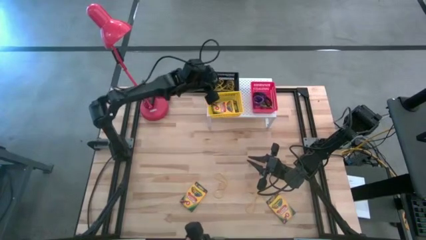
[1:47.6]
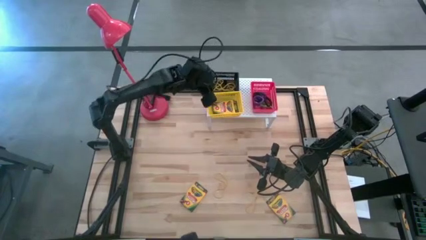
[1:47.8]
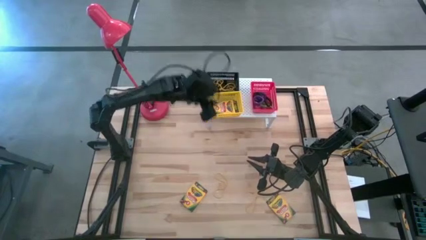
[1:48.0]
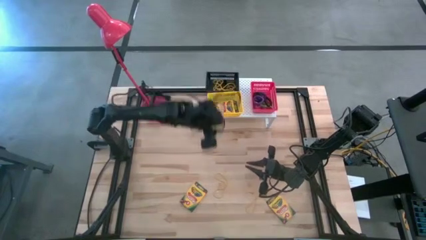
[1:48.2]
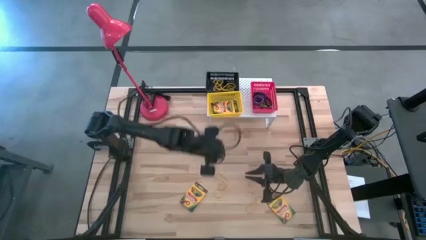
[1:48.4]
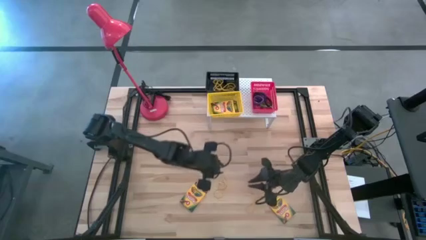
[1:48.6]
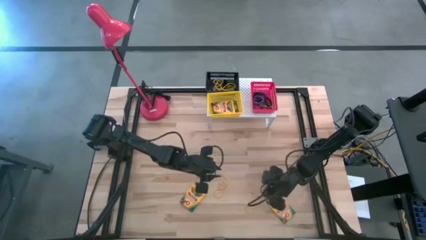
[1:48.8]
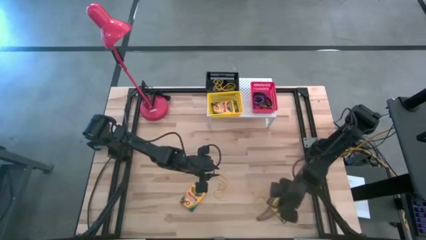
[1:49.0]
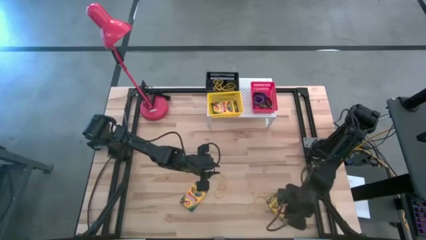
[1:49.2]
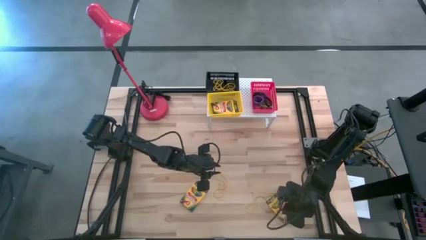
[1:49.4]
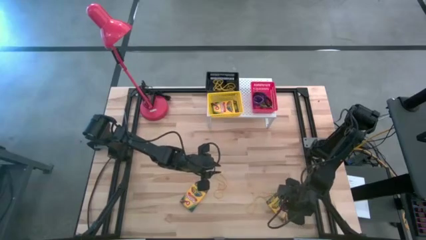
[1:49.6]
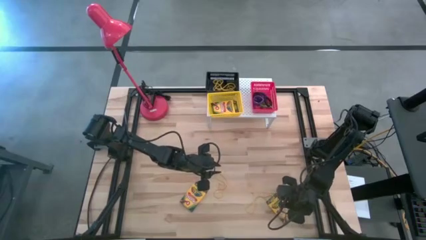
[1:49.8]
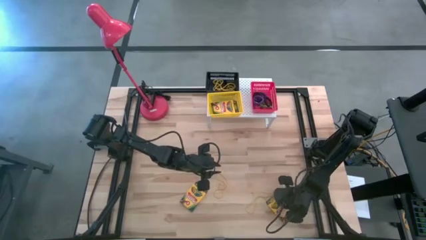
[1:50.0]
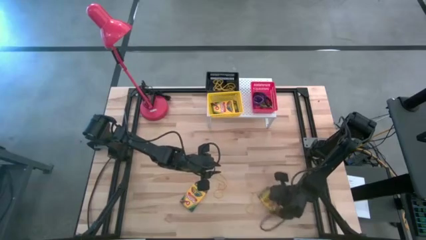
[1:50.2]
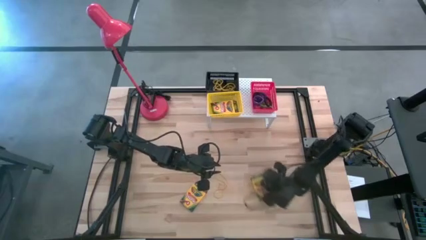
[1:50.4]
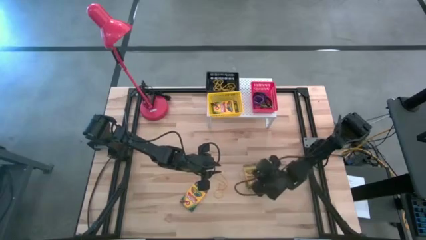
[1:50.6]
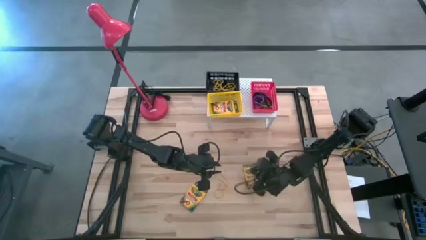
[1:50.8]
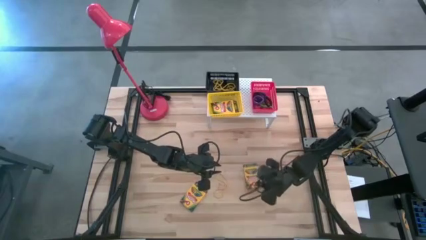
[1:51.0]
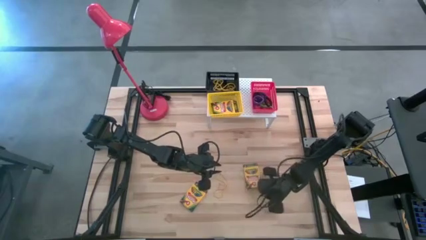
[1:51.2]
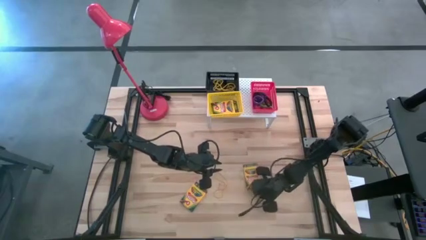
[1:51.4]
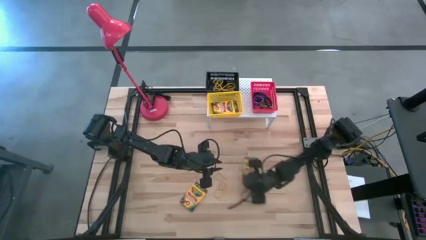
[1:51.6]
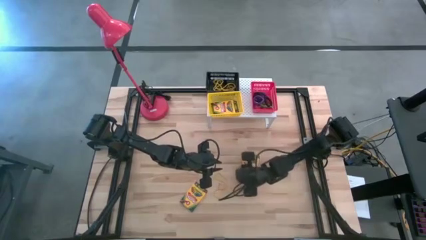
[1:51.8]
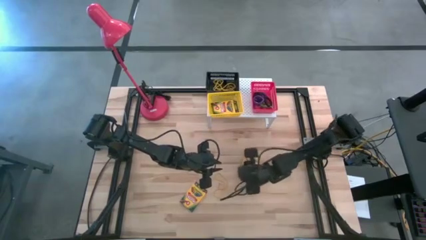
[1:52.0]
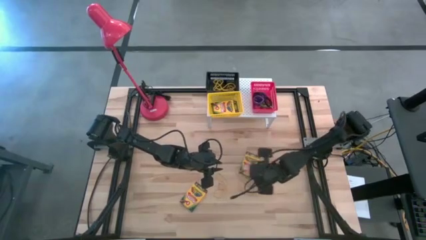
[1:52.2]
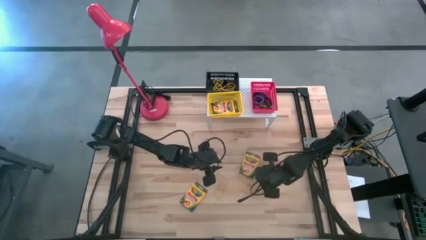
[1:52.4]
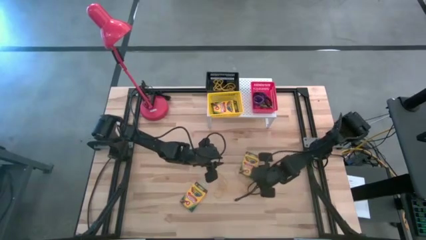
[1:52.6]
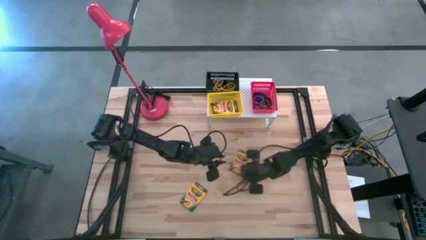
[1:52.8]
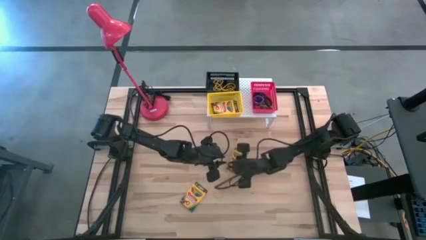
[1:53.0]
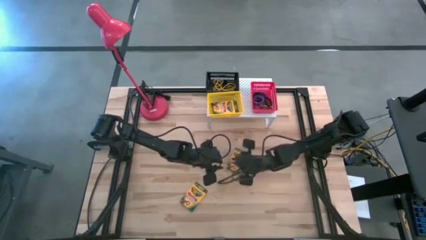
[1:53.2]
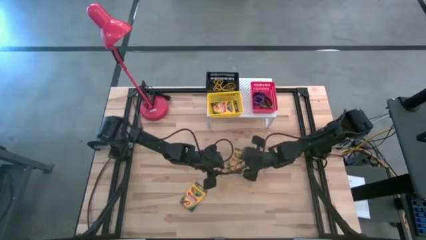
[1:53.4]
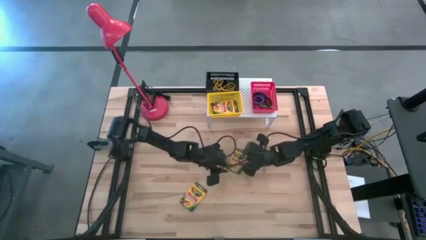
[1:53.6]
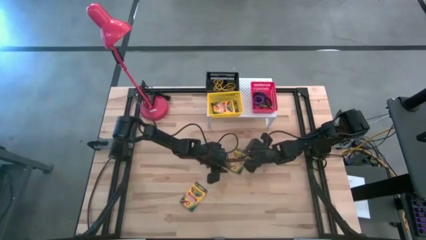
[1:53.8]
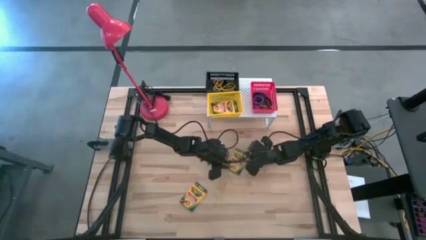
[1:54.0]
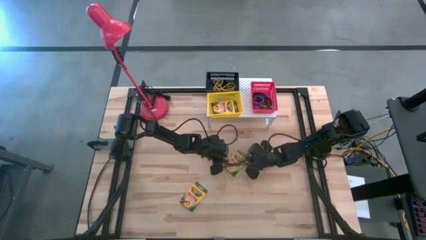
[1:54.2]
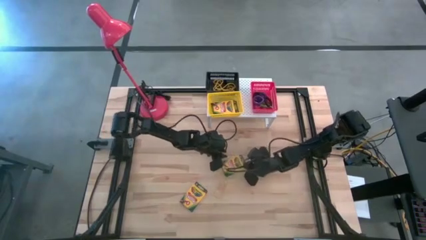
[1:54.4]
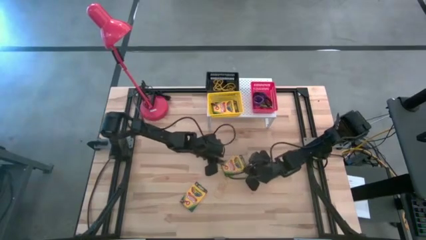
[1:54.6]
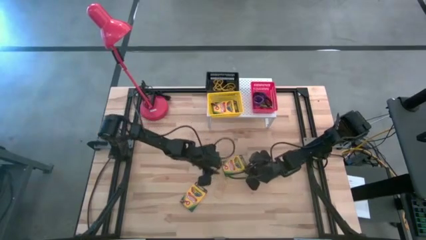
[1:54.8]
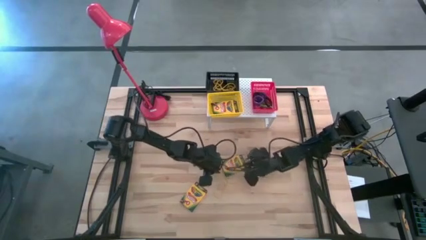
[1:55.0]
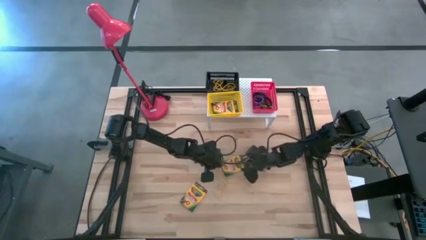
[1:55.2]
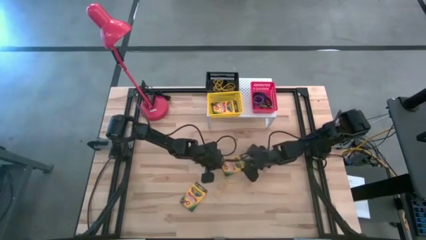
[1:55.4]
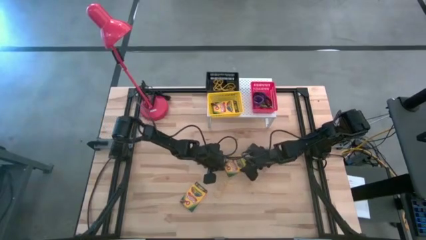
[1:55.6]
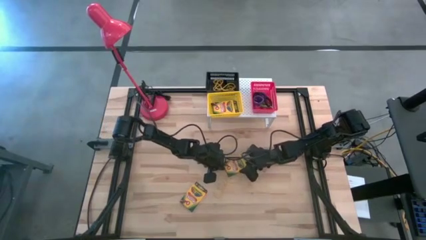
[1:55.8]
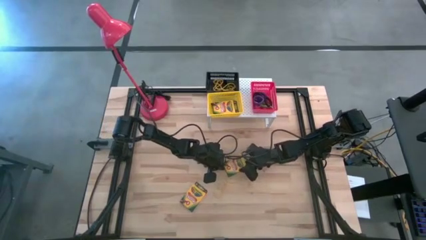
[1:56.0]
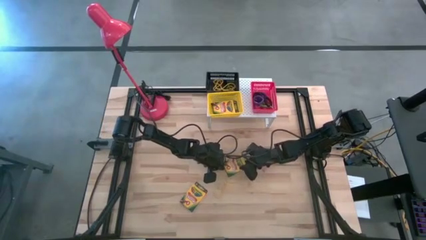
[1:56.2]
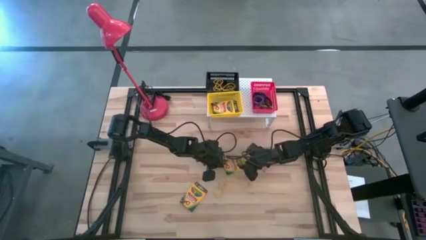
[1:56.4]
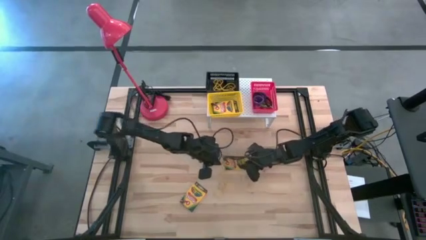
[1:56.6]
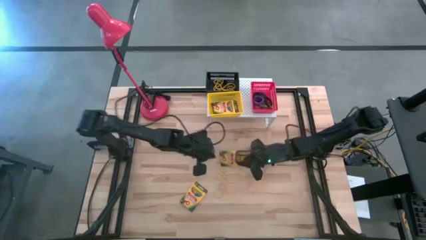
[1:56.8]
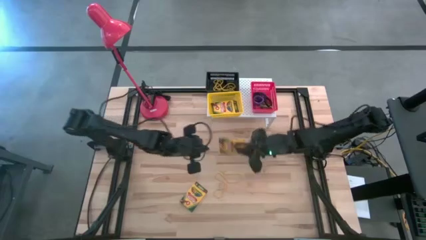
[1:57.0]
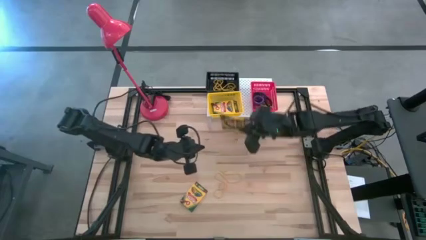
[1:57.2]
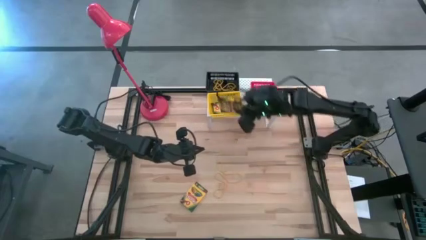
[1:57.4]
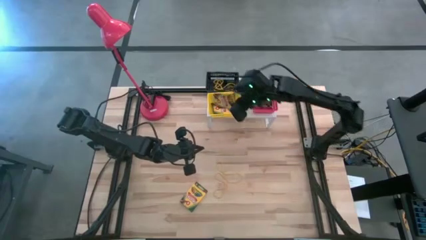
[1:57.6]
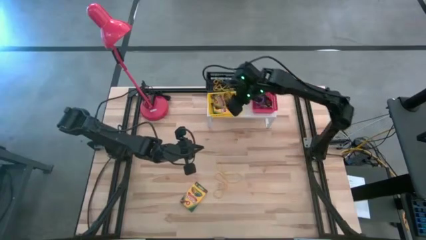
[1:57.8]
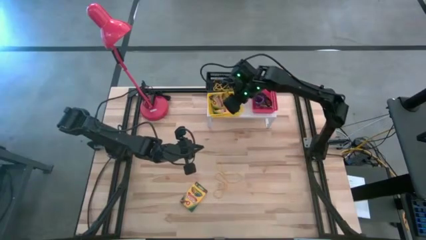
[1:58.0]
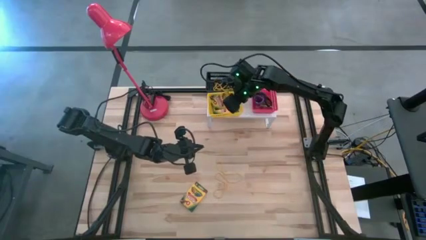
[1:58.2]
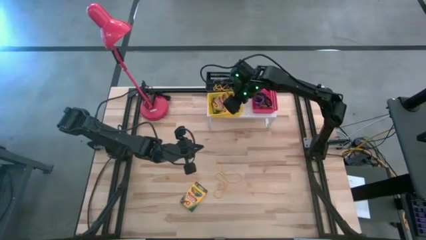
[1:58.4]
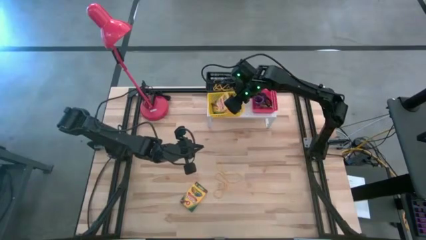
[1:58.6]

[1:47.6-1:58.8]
Task: Pick & Place Office Desk Supplies
Put the yellow crayon box into the yellow bin on the shelf

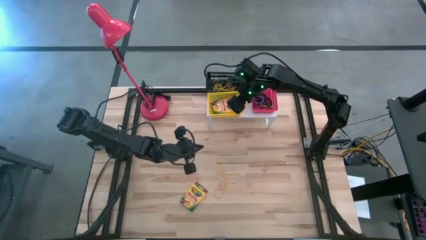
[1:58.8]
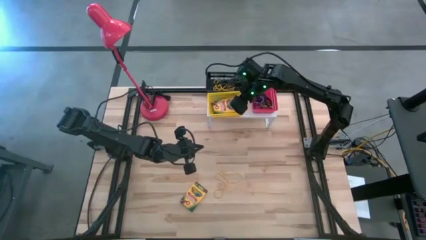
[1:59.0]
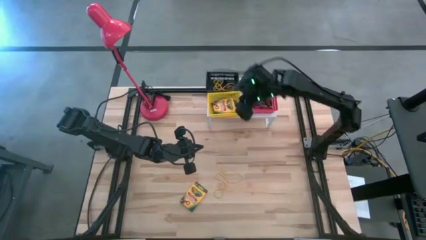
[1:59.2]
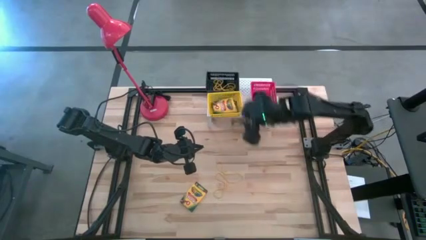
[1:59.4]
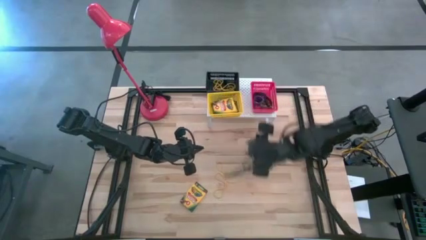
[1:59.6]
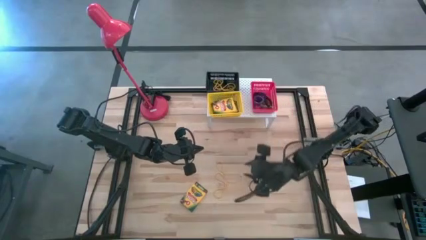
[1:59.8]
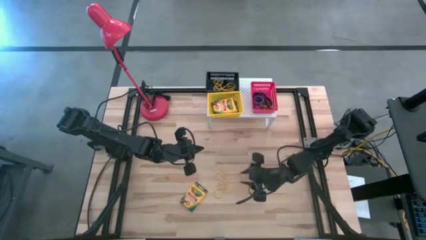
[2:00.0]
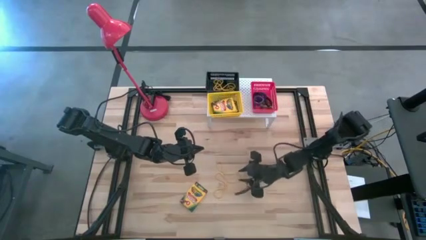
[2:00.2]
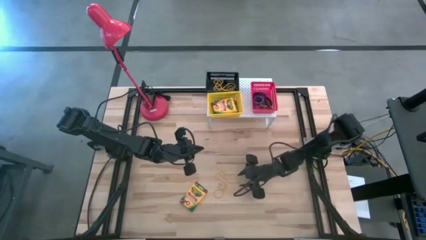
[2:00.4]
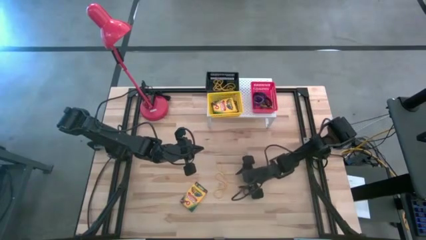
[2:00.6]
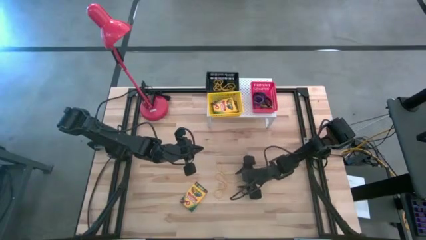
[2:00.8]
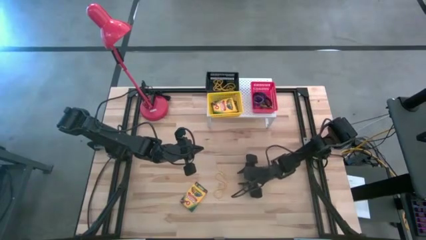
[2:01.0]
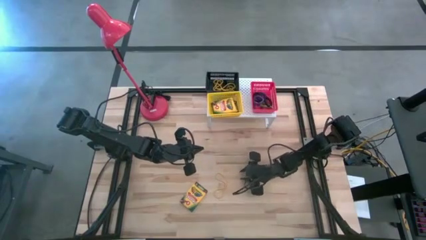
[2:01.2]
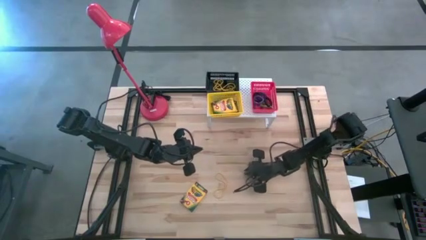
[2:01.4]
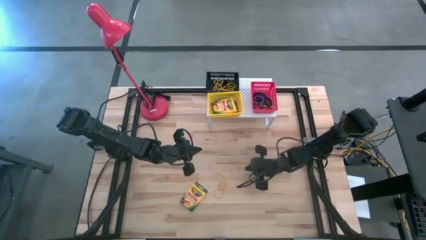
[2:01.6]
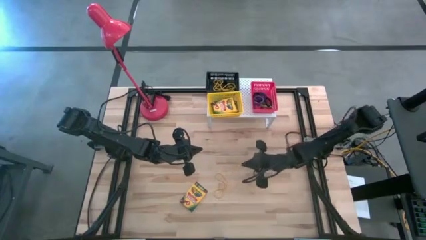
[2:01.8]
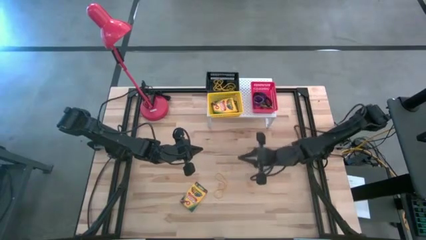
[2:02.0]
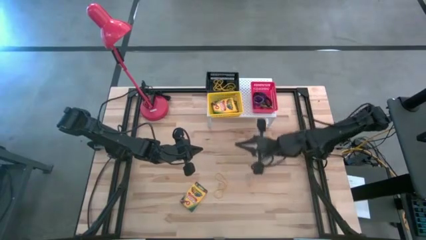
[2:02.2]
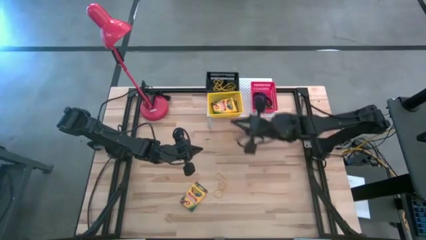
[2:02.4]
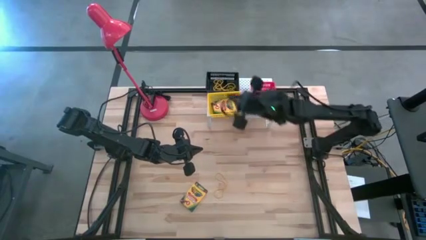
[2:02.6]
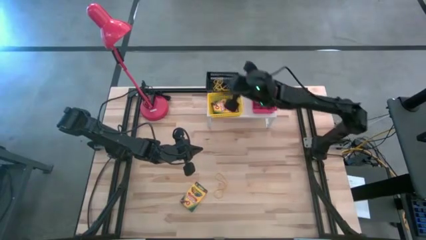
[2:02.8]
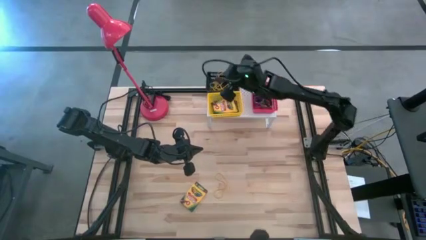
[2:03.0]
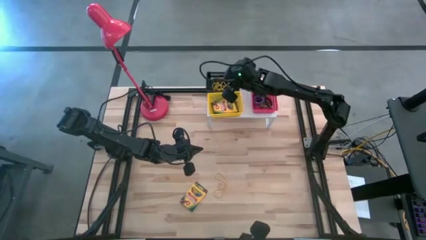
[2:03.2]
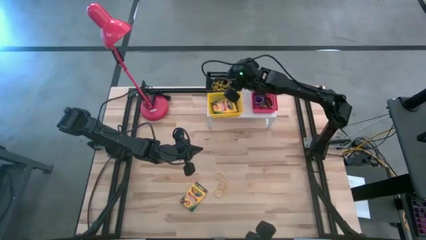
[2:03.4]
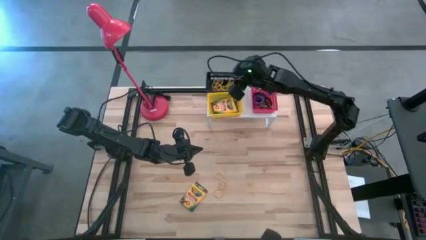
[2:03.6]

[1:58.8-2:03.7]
Put the yellow rubber band into the black bin on the shelf
